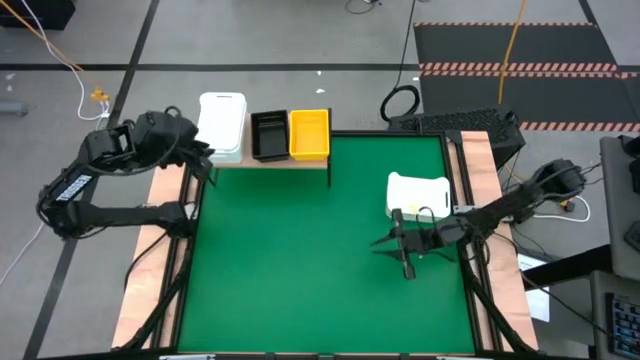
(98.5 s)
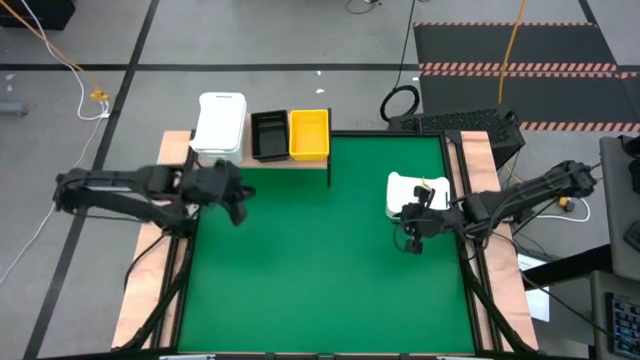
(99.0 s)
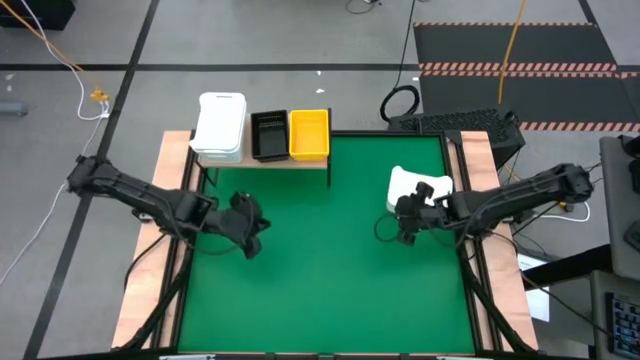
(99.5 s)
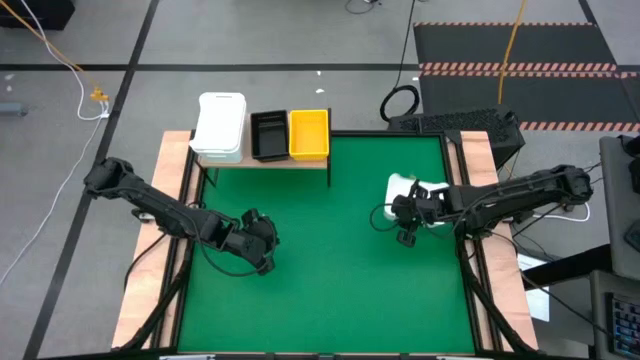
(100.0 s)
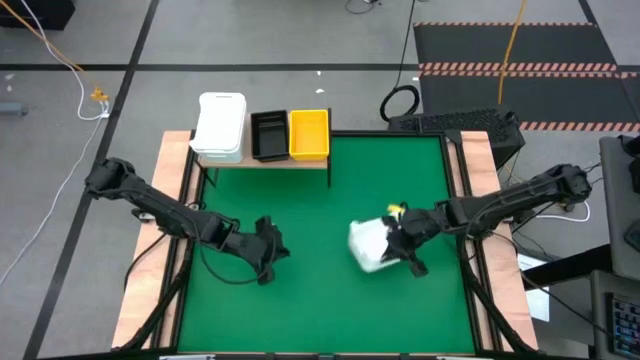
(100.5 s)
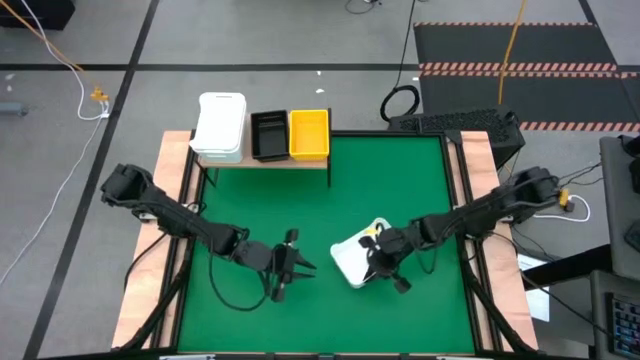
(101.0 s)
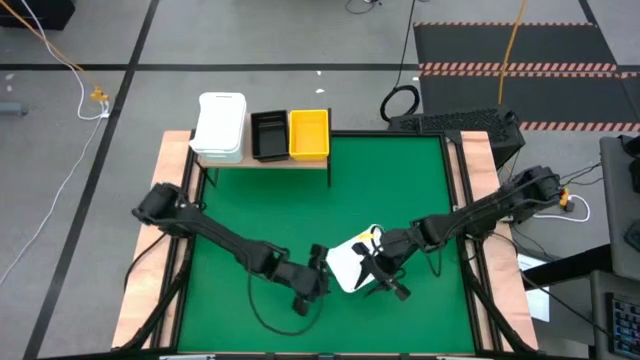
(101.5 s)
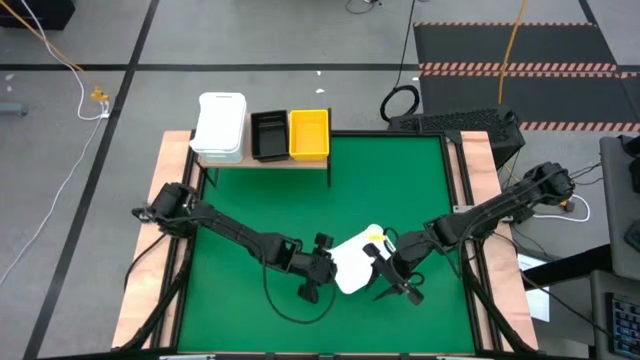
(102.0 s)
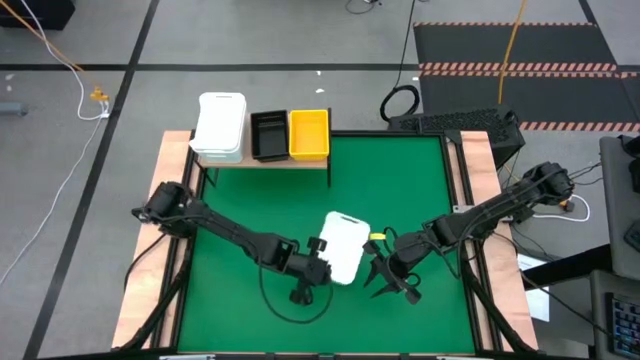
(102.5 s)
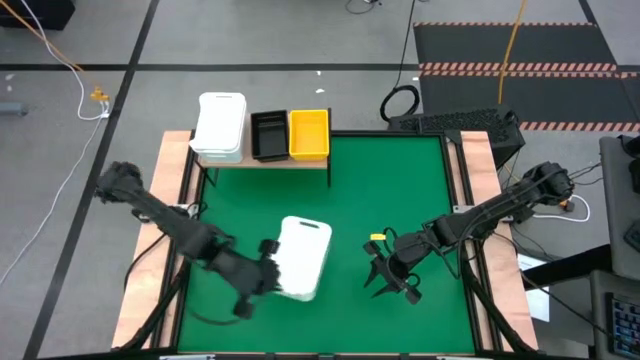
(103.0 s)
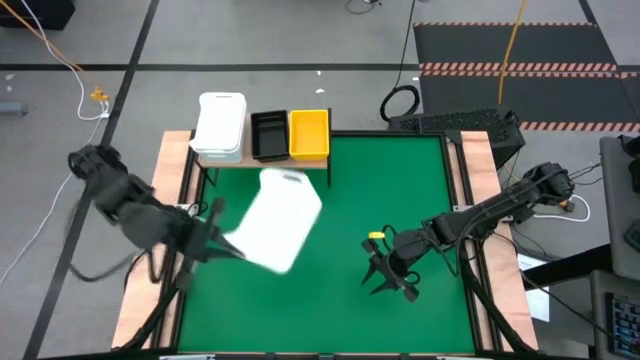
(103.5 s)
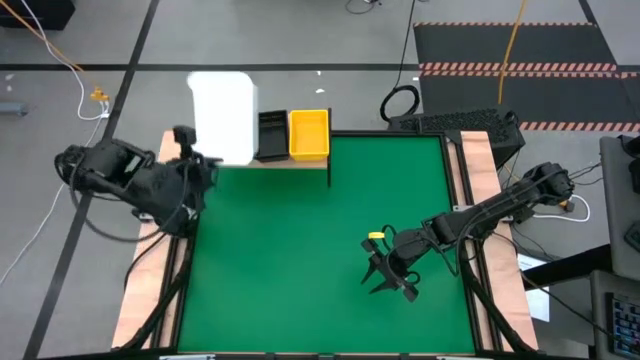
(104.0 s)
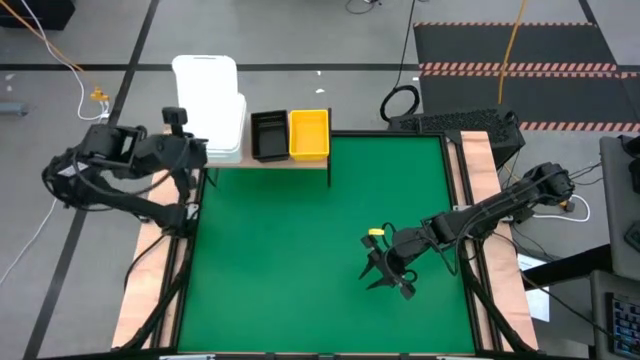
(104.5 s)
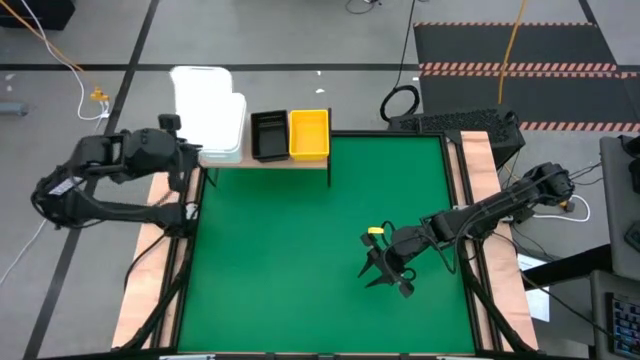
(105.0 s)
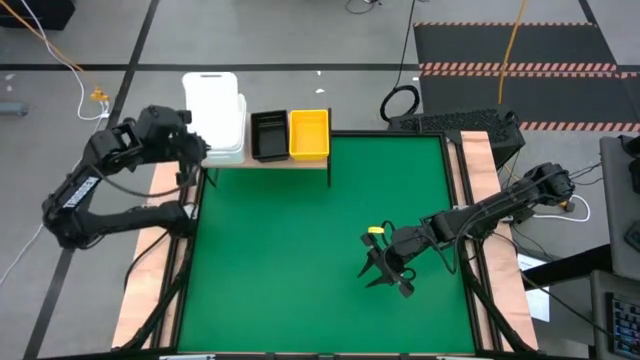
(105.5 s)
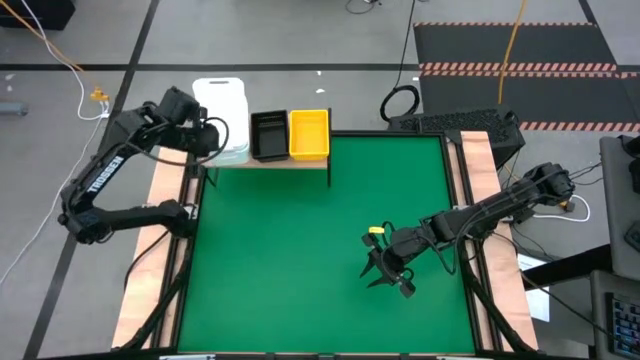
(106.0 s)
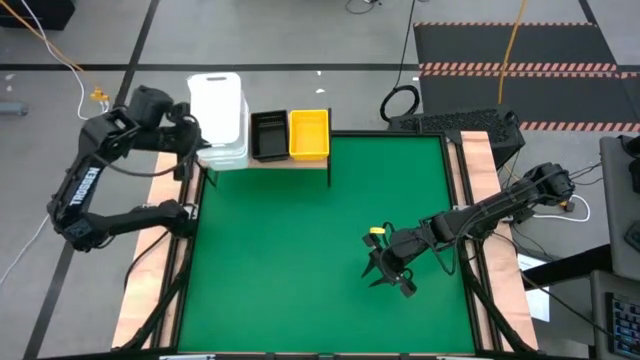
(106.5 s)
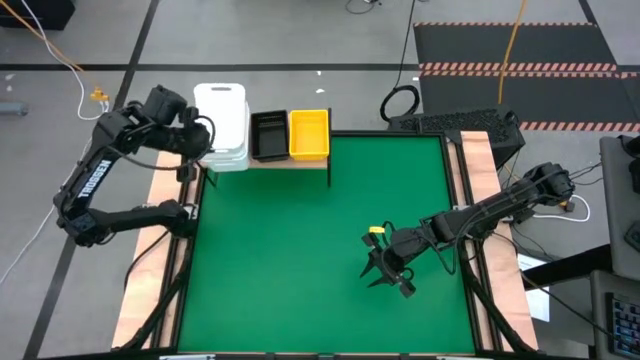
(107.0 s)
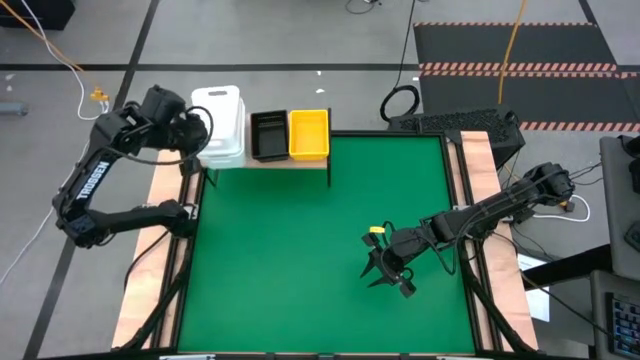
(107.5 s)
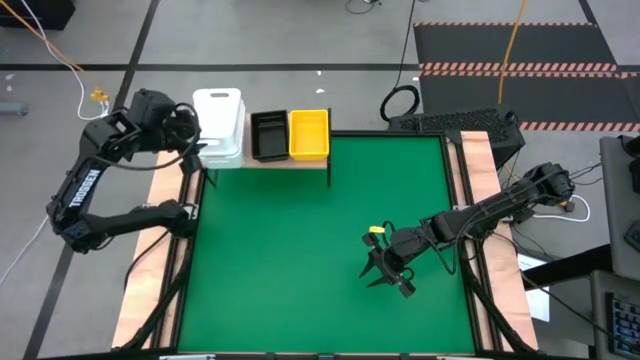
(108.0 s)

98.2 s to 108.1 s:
Task: Stack baskets on shelf by color
Stack the white bin on top of the other white bin on the shelf

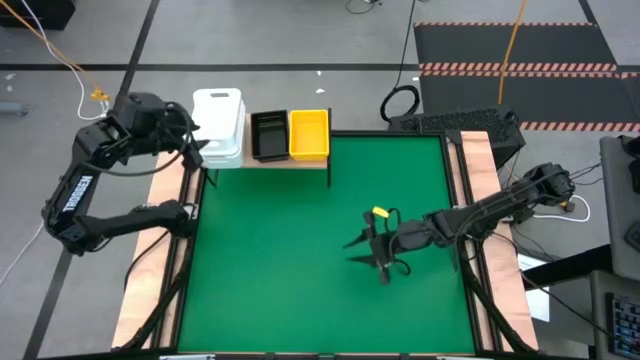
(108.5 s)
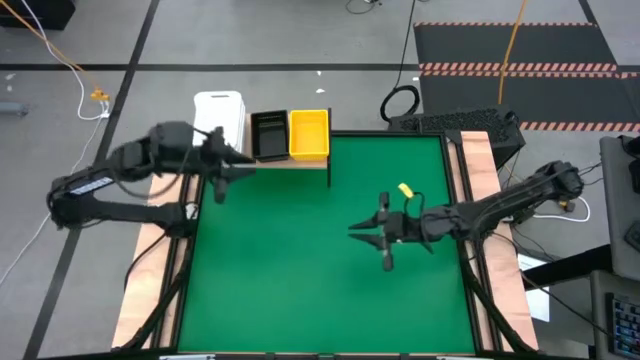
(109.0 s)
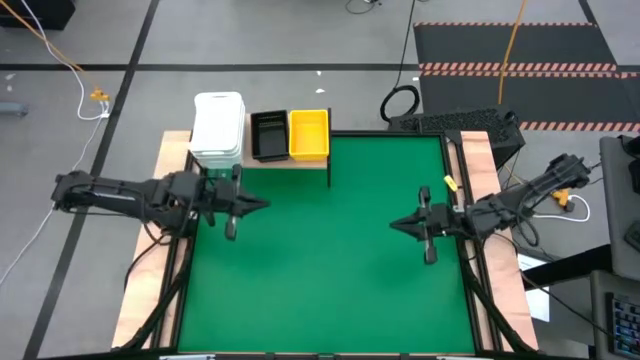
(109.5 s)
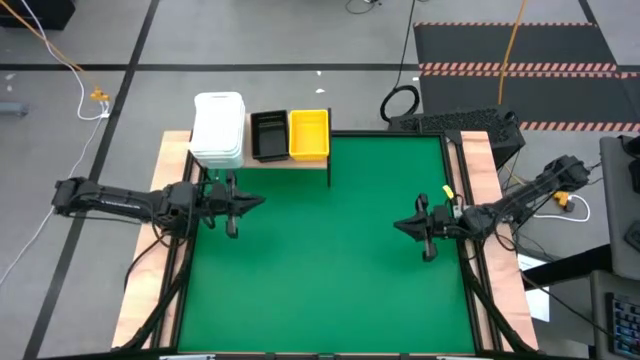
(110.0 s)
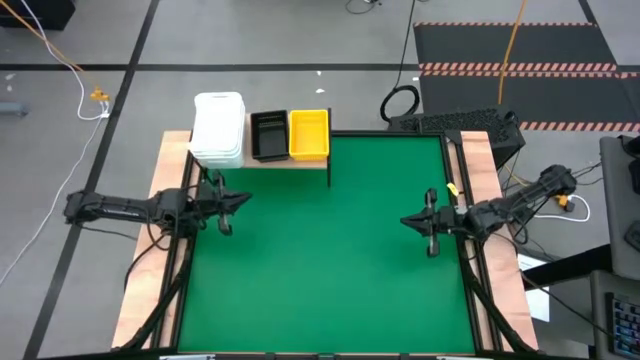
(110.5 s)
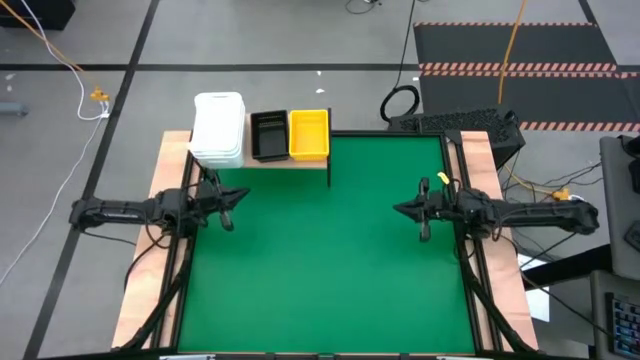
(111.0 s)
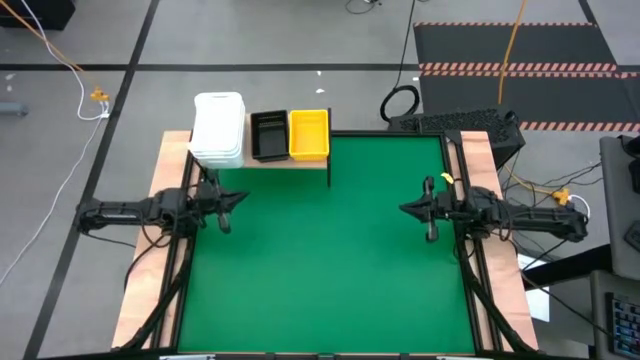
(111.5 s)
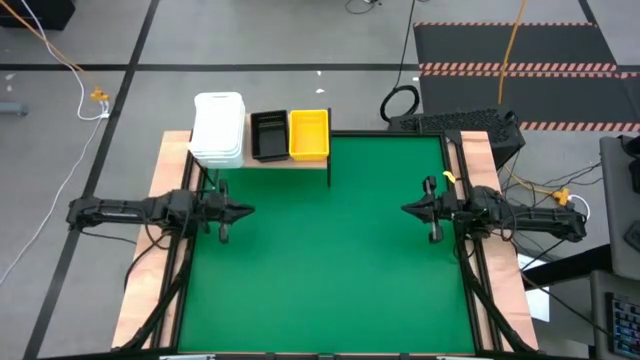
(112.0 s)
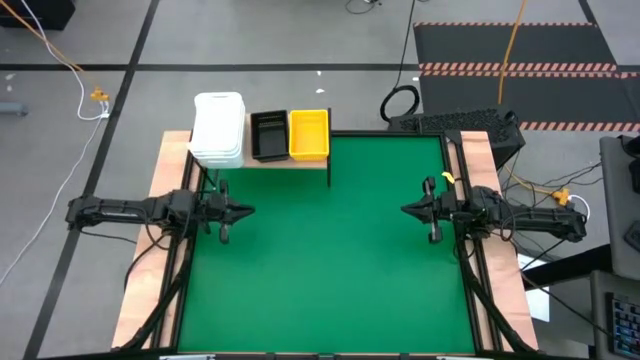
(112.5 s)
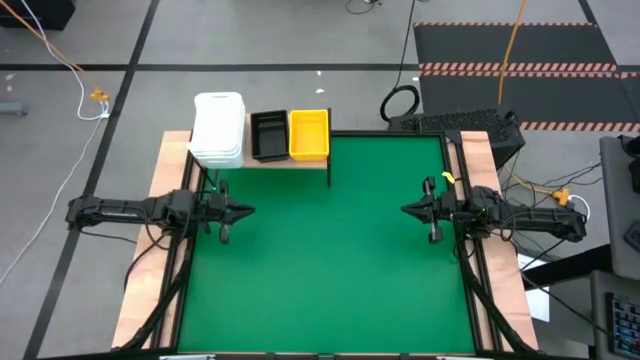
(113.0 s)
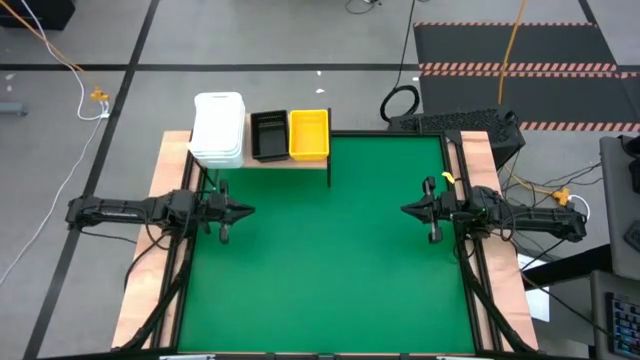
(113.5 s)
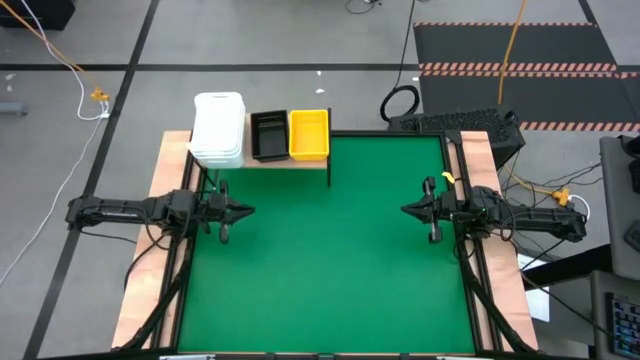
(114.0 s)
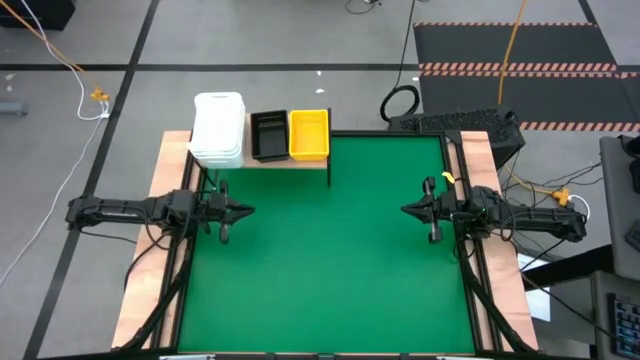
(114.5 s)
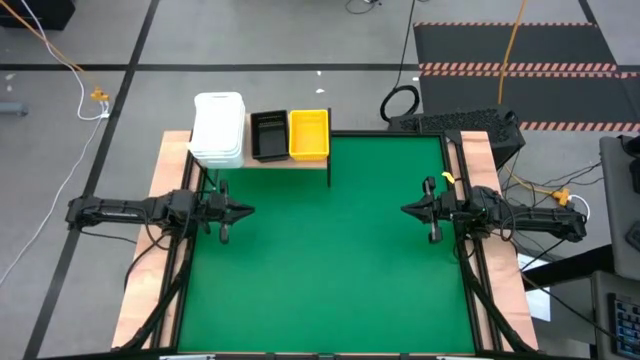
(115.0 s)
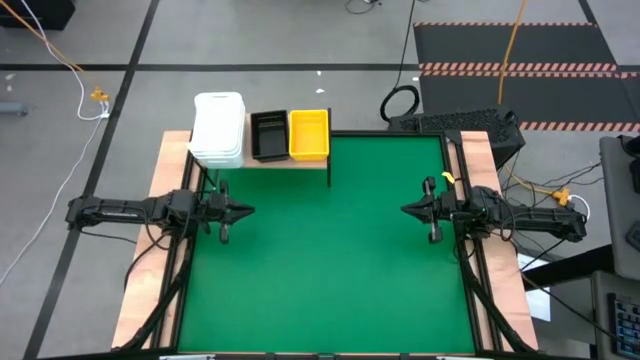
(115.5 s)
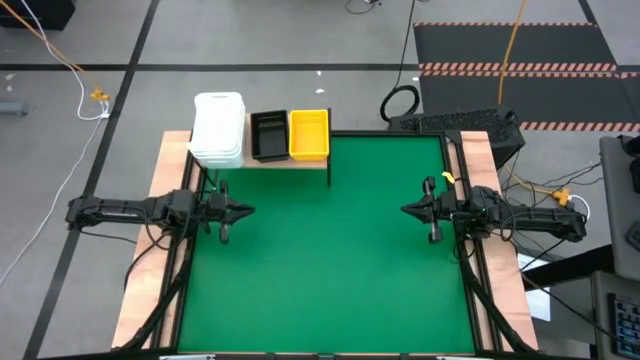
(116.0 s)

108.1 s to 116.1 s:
Return to Home Position

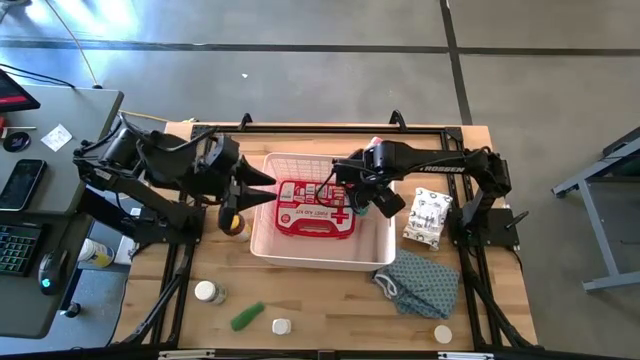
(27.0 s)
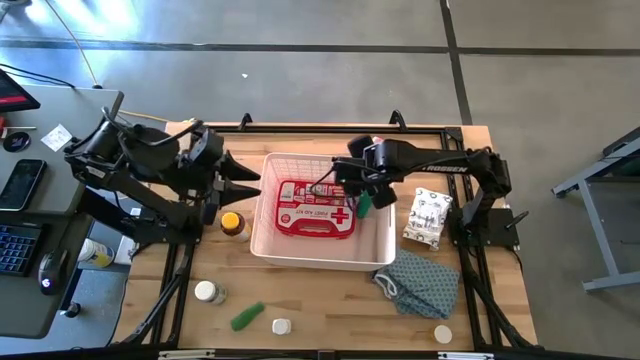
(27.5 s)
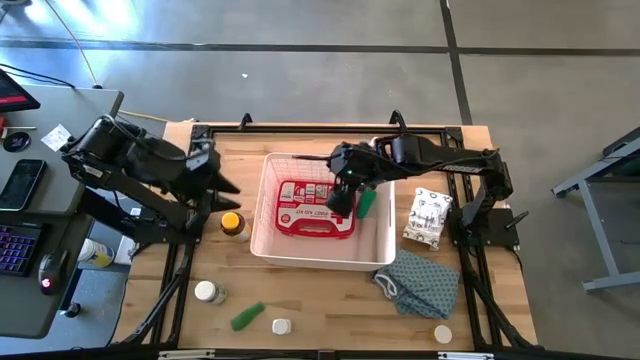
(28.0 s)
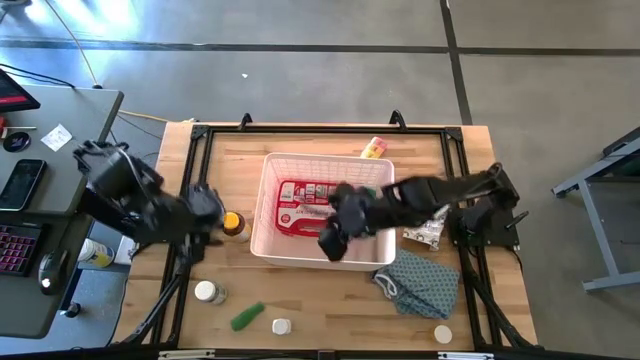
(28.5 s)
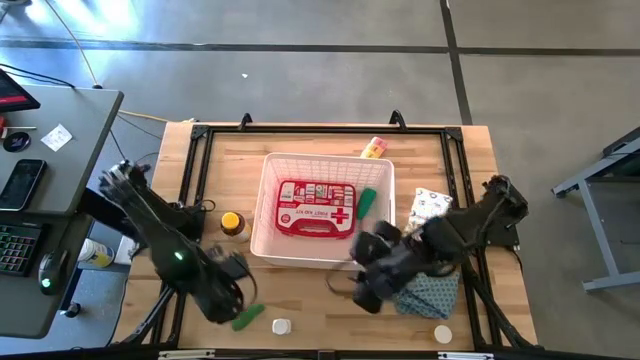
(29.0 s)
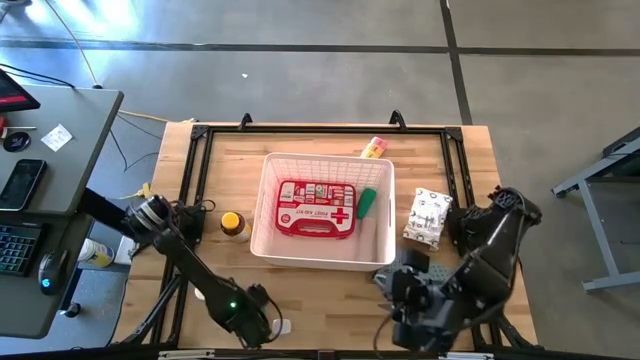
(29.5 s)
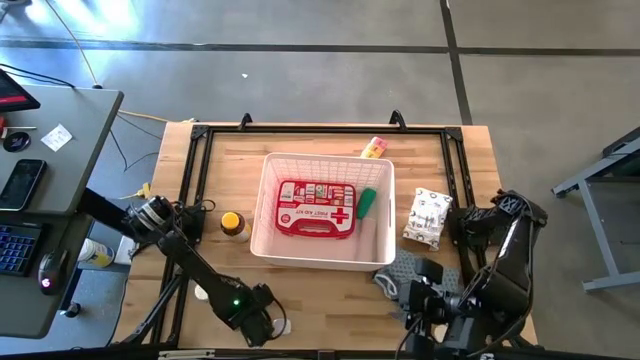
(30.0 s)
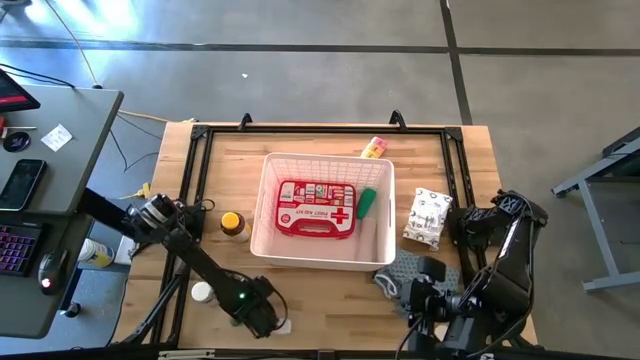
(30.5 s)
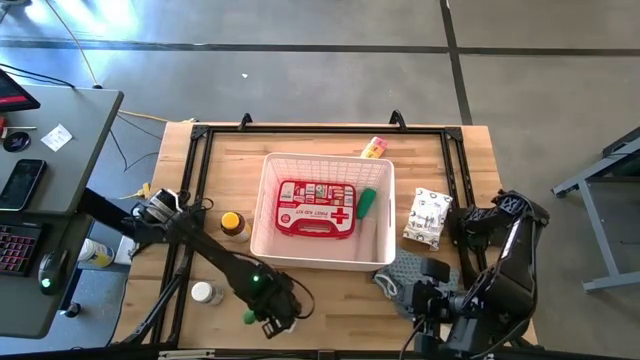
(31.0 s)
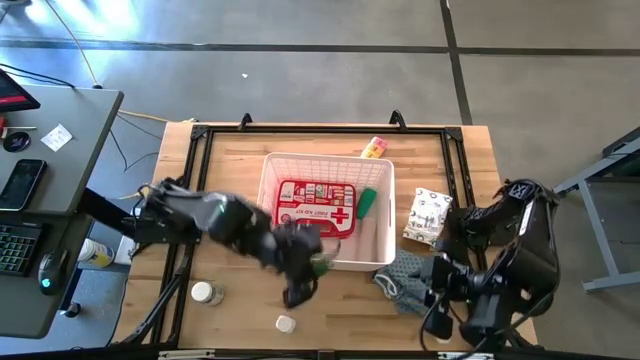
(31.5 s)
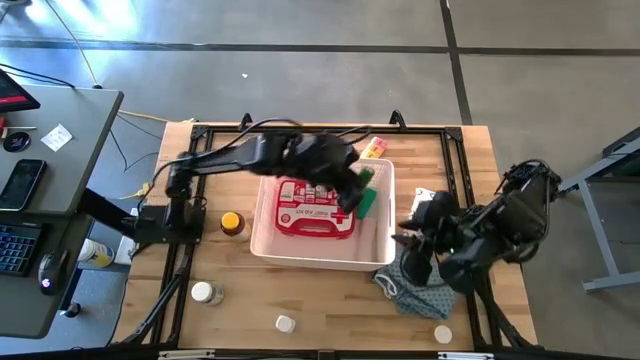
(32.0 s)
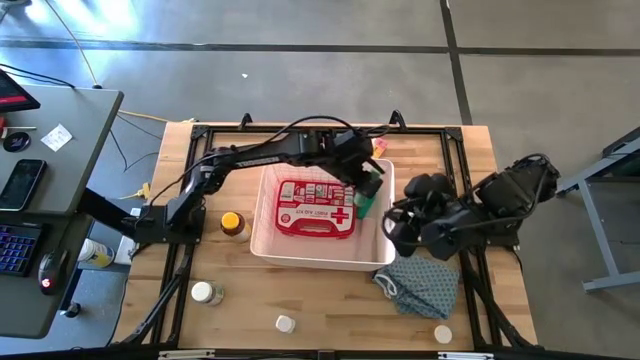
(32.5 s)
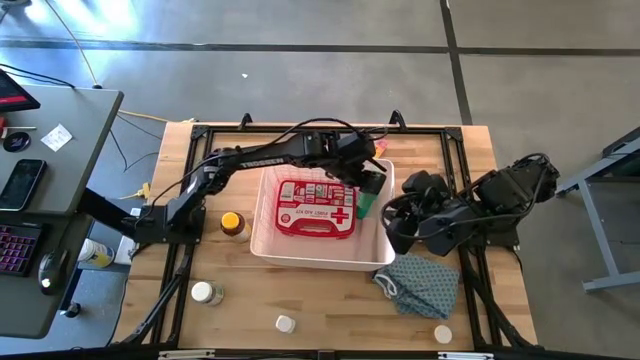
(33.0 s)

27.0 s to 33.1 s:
Task: Pick & place medical supplies in basket/bin
Put the rolled green bandage into the white container
